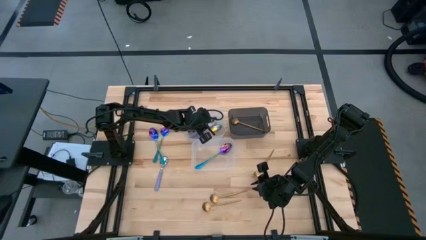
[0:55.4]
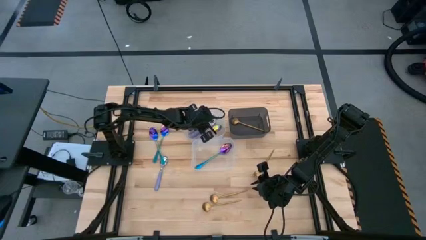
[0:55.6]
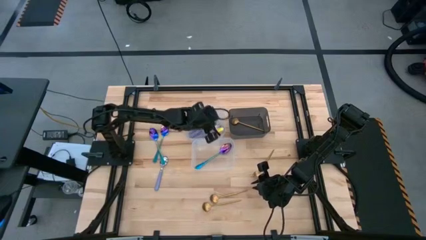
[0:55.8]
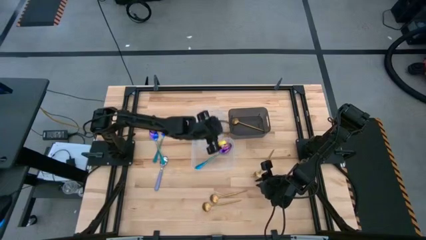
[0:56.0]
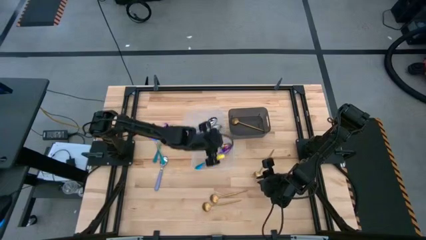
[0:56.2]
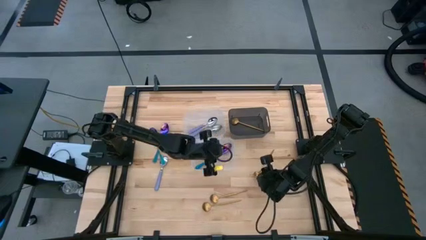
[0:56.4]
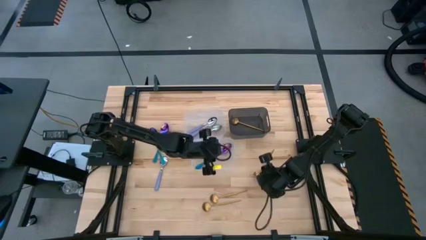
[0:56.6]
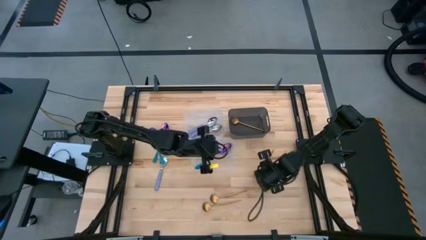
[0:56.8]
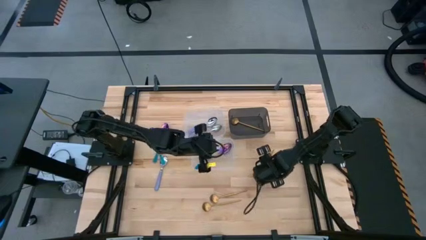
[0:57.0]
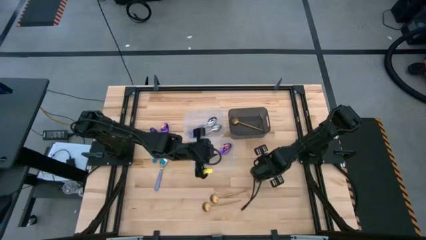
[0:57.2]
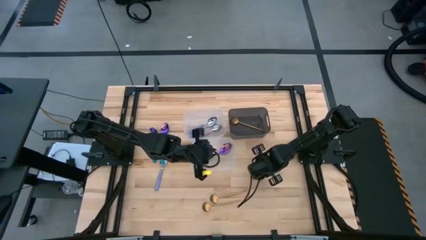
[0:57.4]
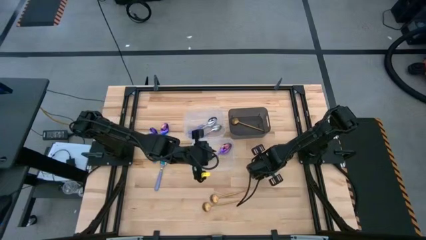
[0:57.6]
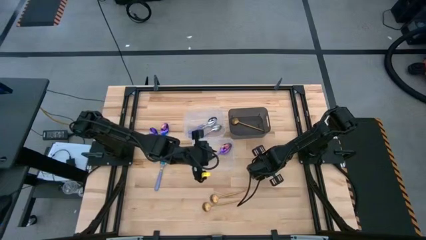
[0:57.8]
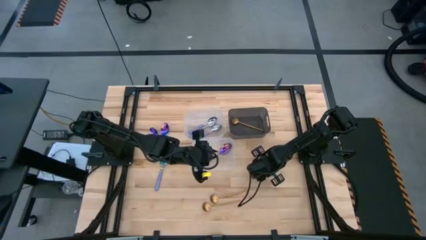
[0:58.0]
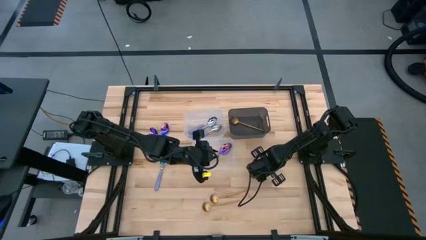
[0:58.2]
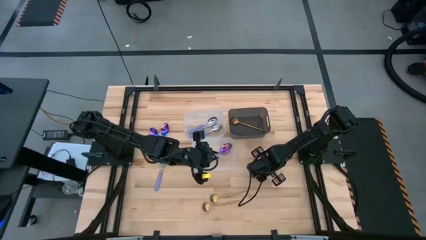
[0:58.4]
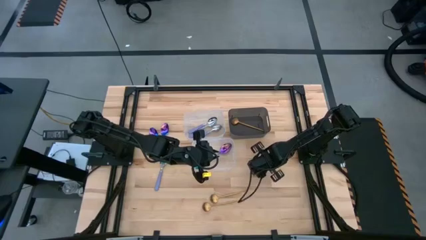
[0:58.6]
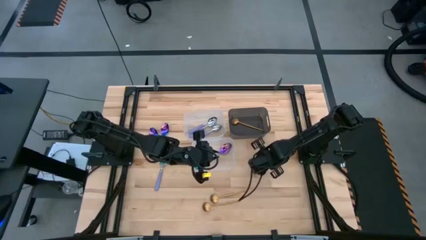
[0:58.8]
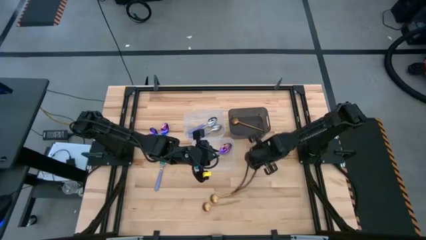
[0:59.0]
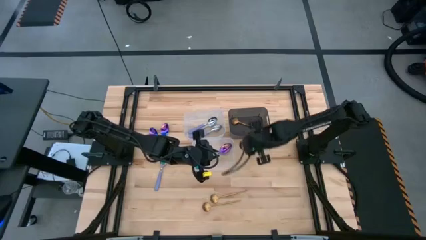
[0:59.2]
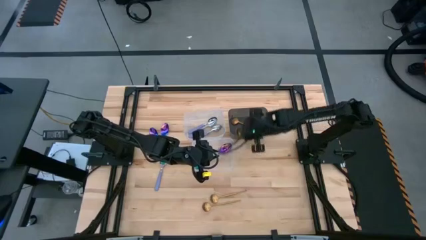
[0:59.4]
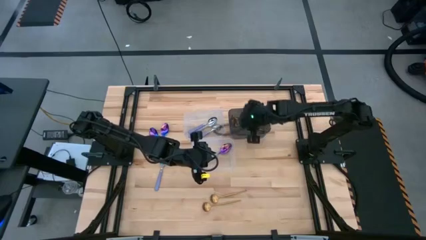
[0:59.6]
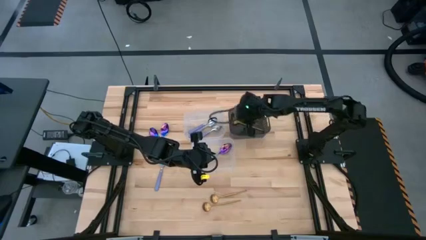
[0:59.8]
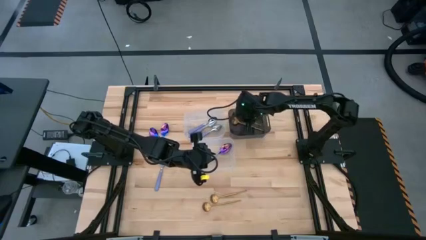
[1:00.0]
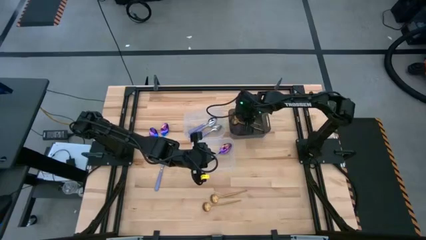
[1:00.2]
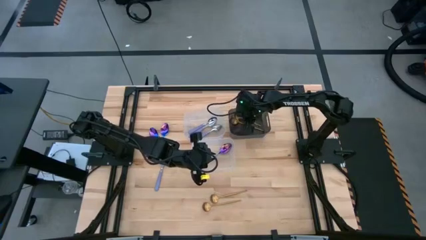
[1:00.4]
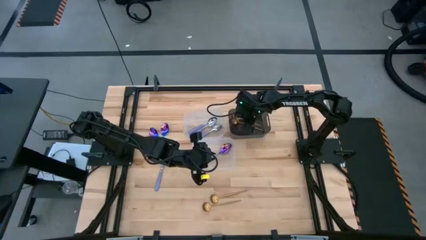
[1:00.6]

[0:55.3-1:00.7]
Task: Sort silverware by color (type)
Put the gold spoon into the black bin

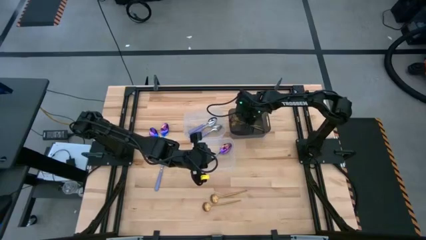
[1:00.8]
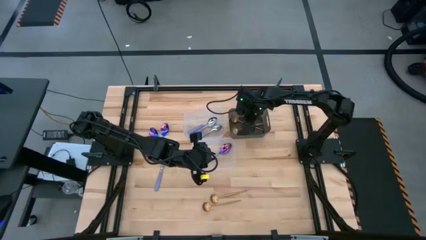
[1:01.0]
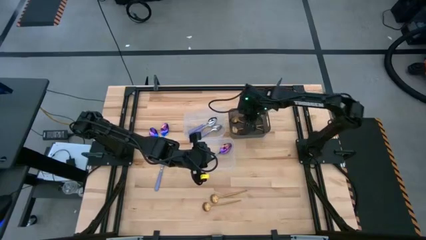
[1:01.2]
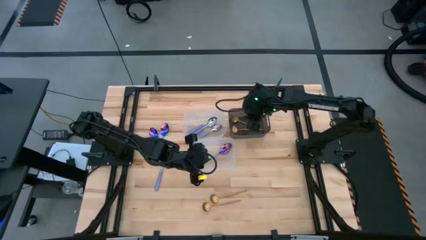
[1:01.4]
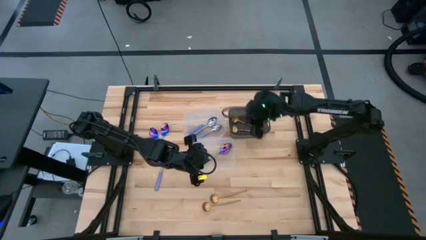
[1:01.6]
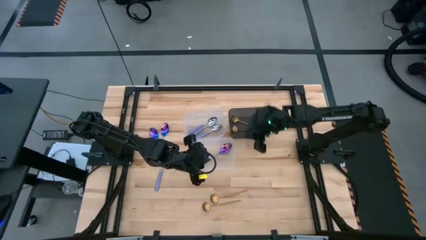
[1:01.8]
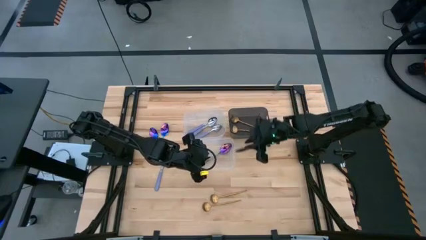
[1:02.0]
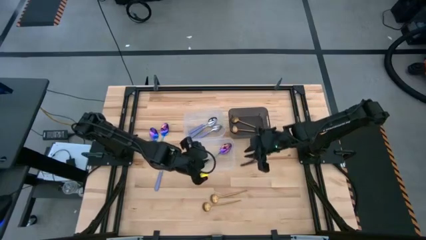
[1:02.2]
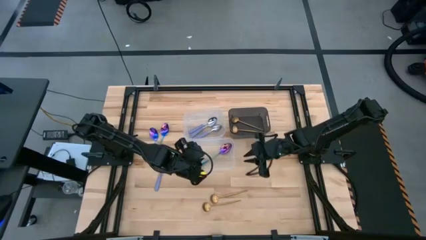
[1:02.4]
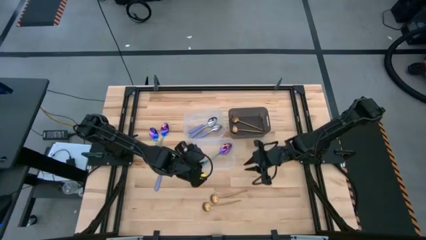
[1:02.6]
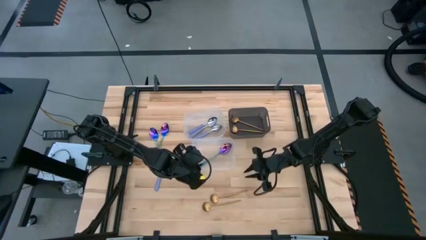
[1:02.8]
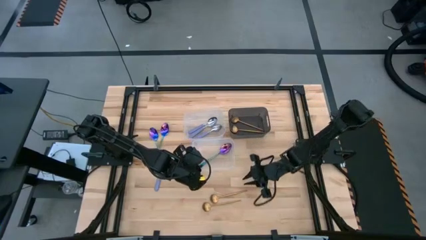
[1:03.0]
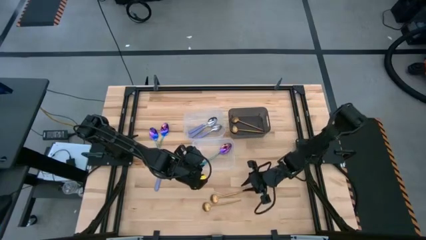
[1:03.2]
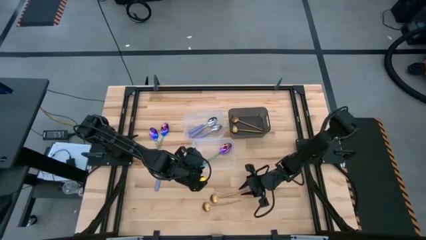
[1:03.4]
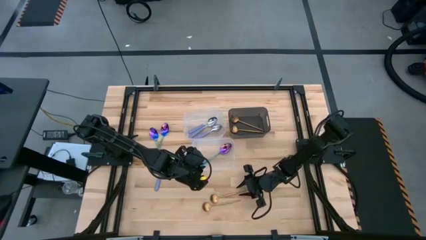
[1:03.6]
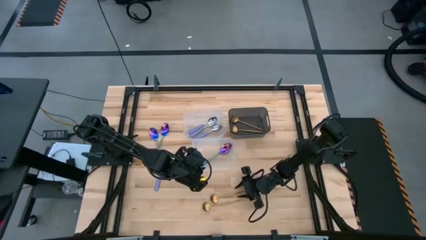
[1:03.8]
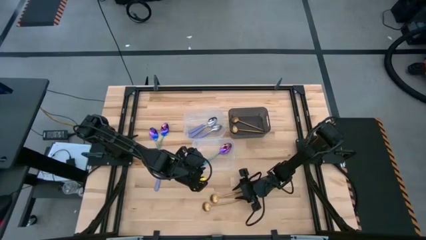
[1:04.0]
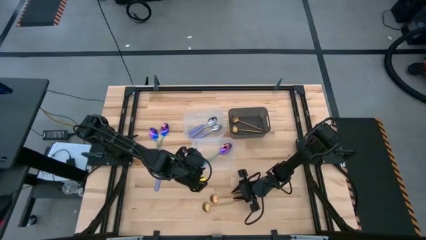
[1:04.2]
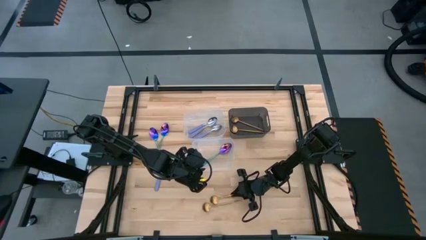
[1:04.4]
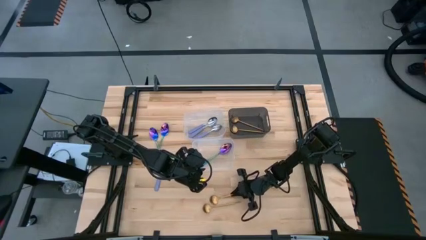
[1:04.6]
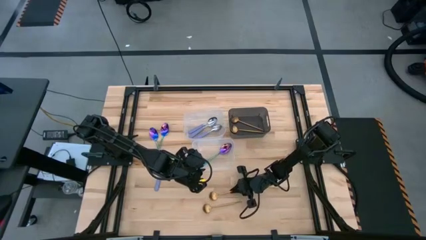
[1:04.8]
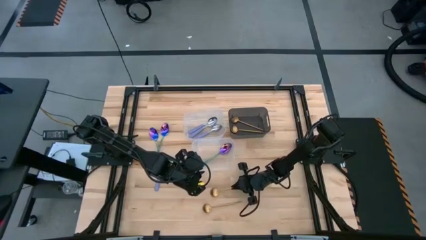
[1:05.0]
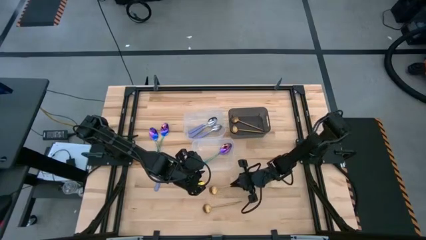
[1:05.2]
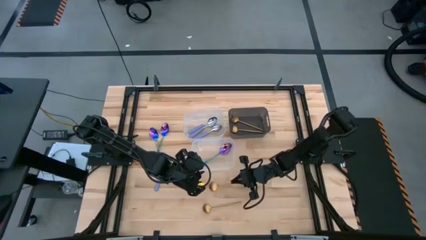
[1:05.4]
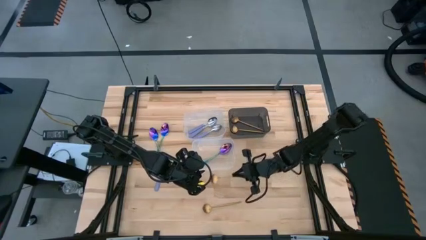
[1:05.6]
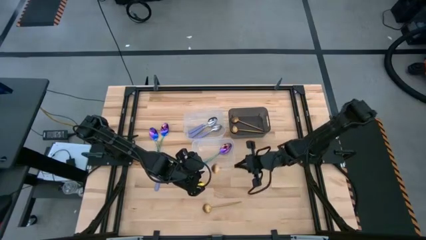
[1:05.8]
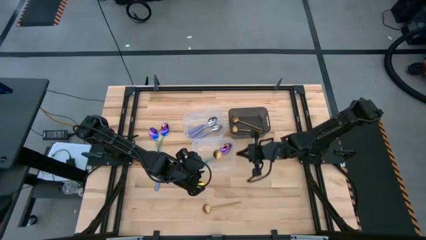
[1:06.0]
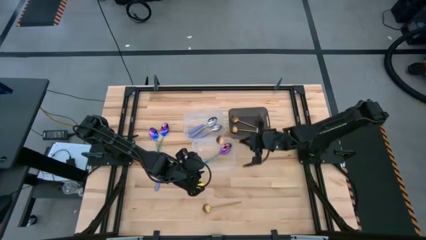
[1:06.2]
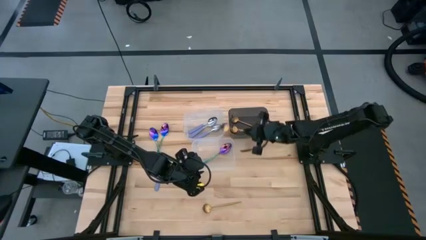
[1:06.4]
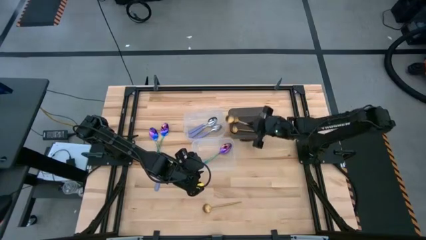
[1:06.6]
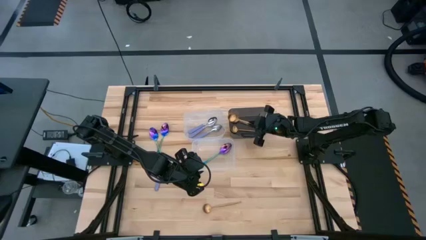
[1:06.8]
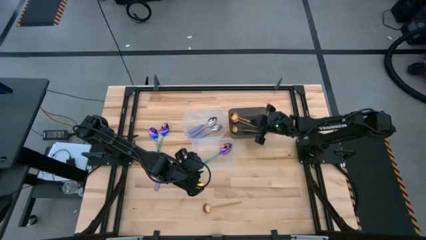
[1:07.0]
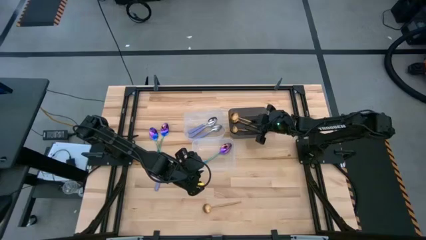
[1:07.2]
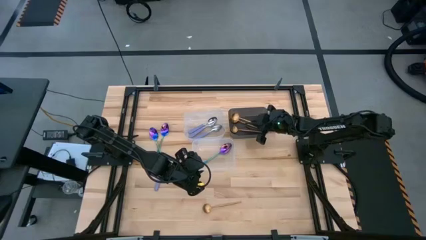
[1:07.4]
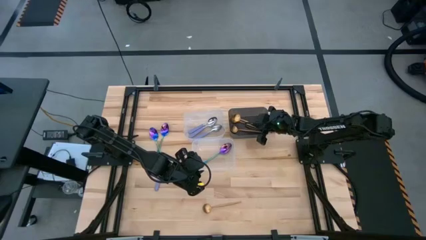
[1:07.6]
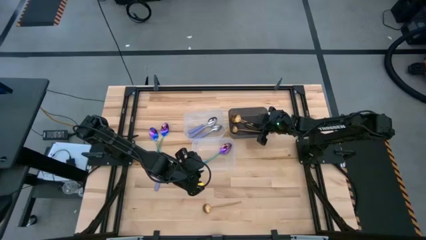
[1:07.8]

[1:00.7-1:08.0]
Put the gold spoon into the black bin

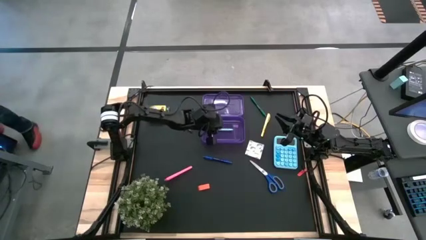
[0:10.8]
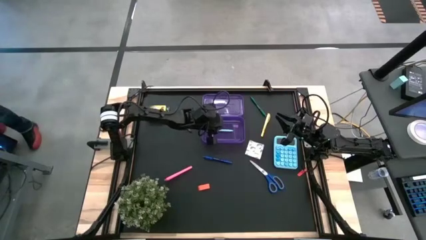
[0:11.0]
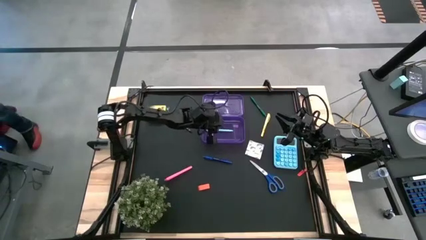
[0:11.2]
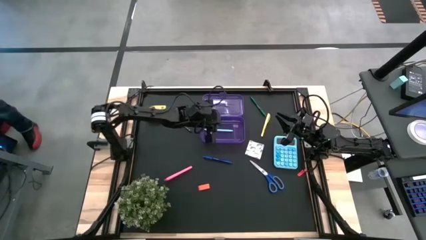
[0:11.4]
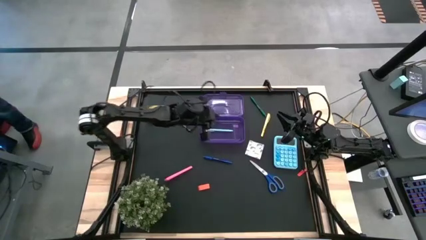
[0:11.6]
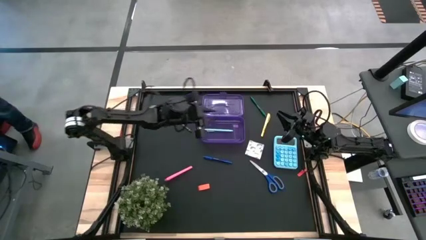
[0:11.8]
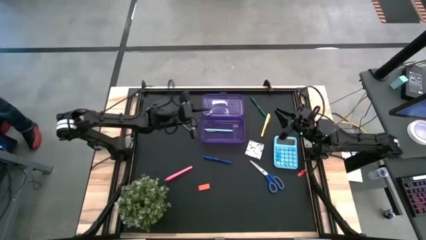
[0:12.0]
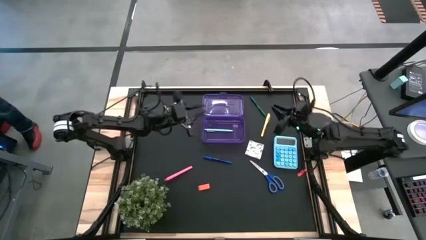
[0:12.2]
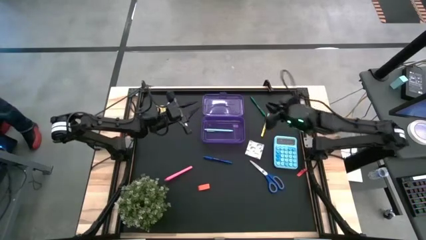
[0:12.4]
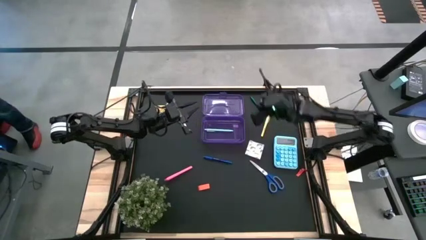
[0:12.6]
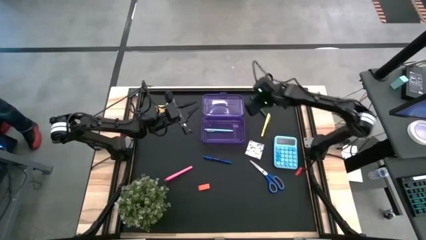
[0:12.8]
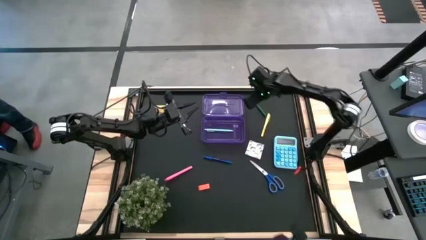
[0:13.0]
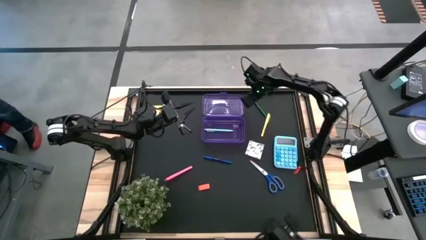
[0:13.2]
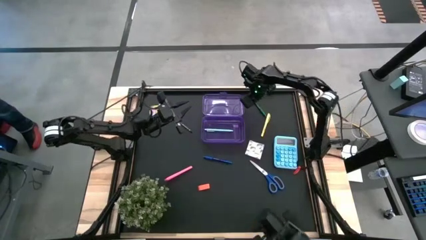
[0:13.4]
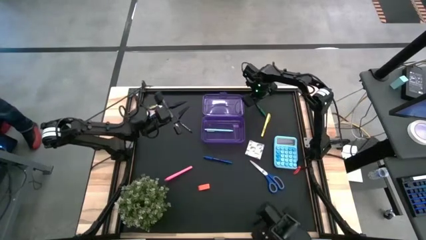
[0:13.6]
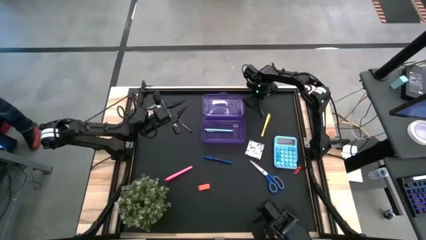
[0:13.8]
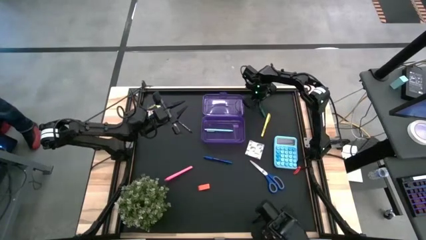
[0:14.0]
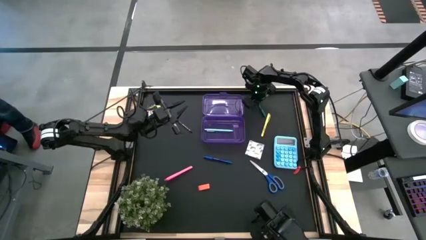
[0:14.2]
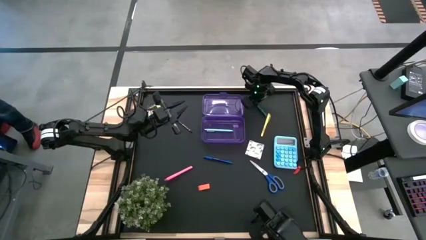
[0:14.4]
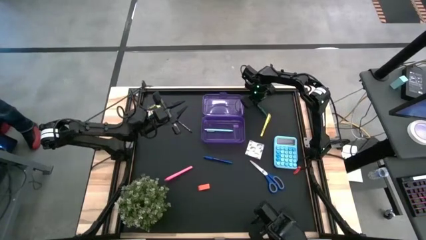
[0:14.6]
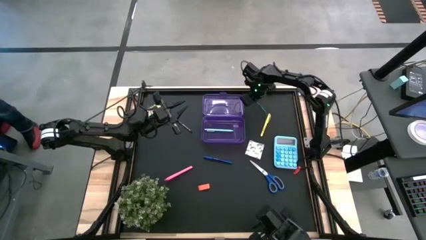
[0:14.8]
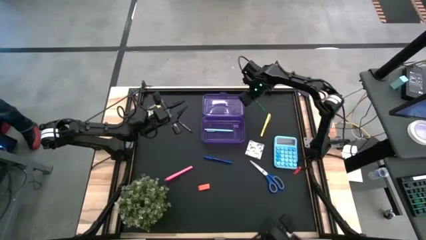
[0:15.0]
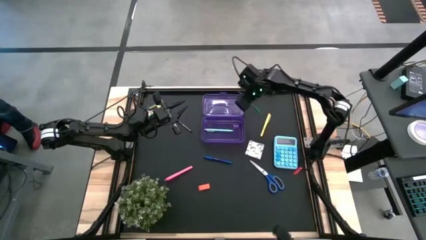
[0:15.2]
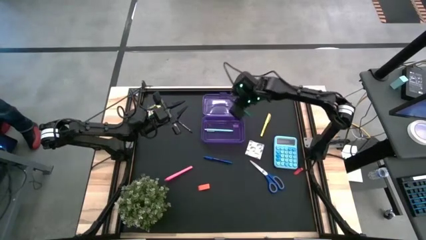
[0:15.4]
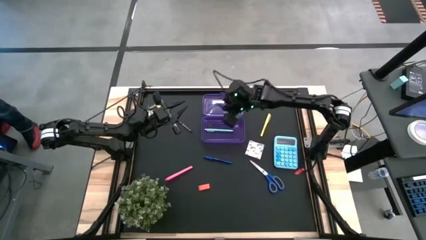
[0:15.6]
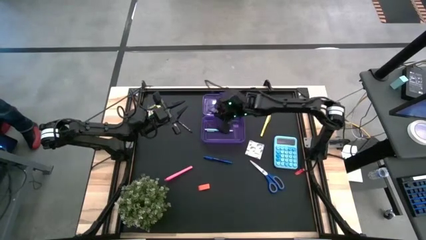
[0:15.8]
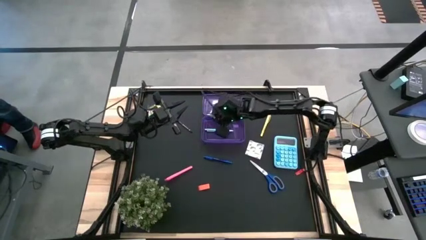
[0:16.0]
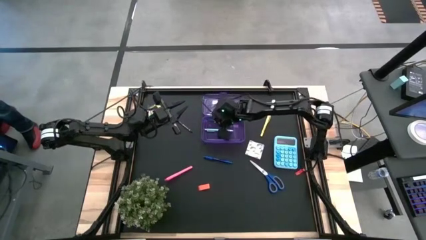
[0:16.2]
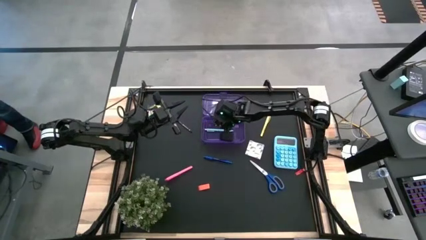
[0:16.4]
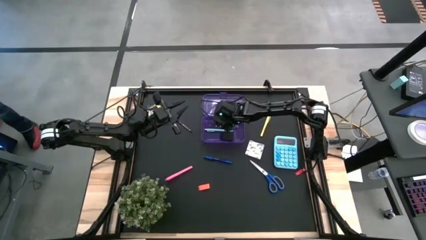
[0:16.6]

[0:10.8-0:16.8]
Task: Pack school essentials
Put the green pen into the purple box
